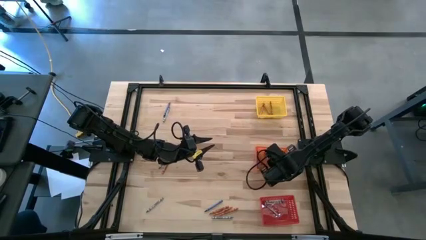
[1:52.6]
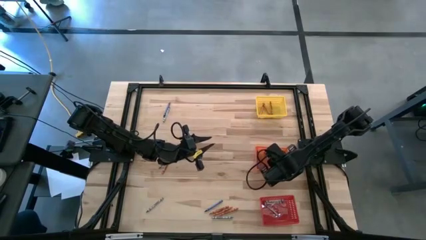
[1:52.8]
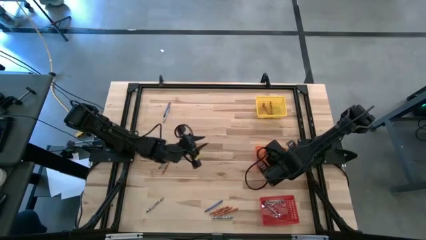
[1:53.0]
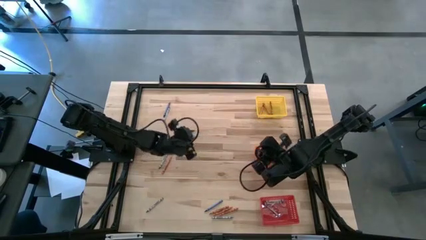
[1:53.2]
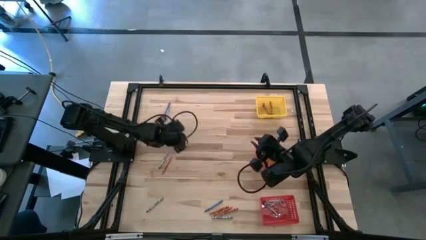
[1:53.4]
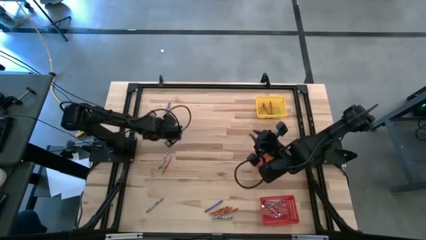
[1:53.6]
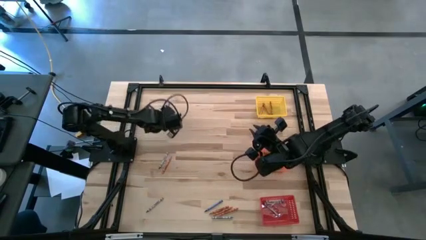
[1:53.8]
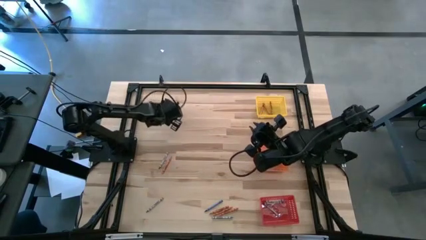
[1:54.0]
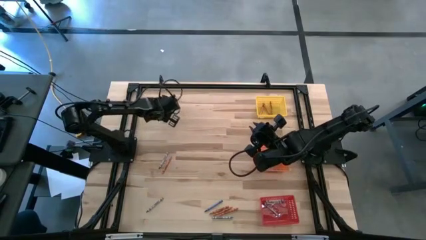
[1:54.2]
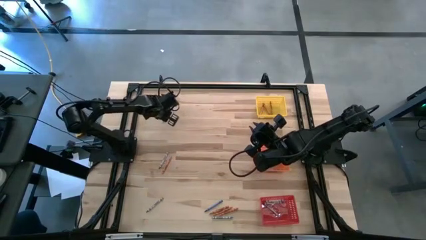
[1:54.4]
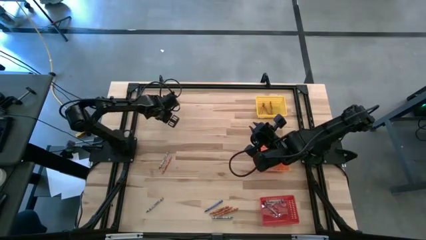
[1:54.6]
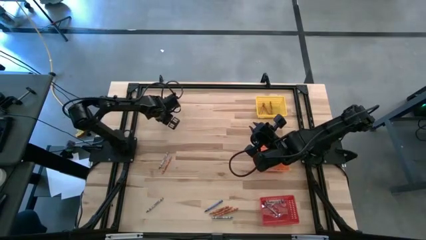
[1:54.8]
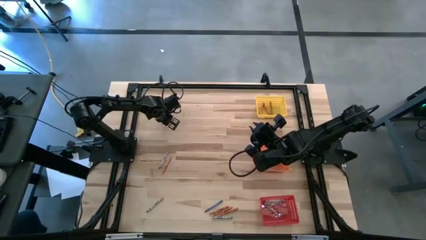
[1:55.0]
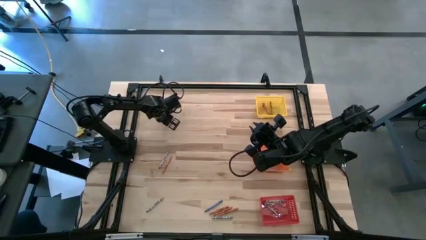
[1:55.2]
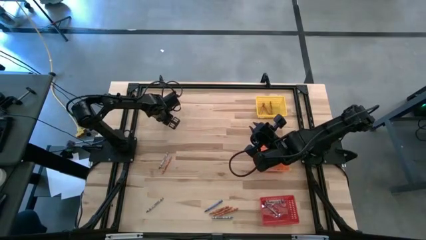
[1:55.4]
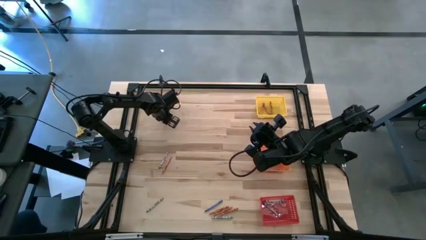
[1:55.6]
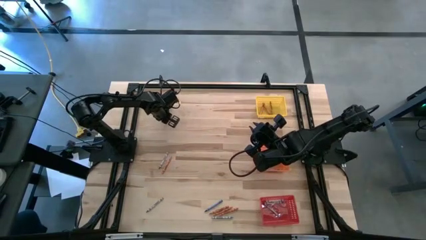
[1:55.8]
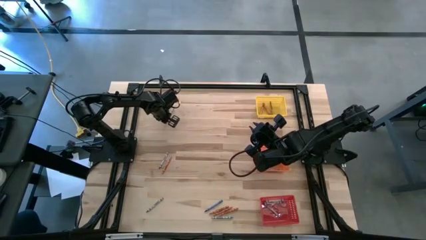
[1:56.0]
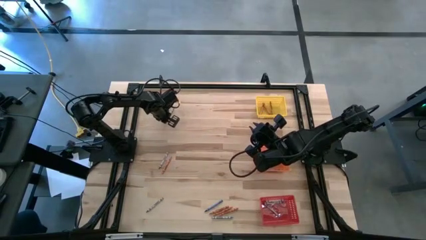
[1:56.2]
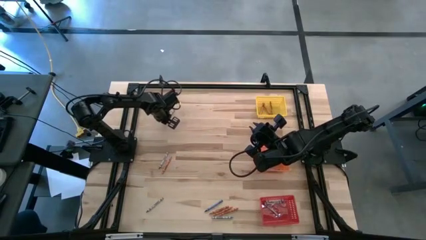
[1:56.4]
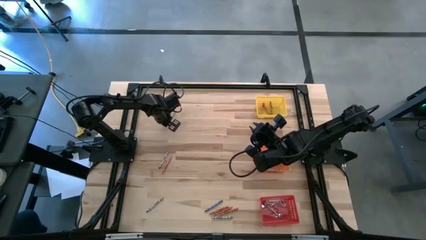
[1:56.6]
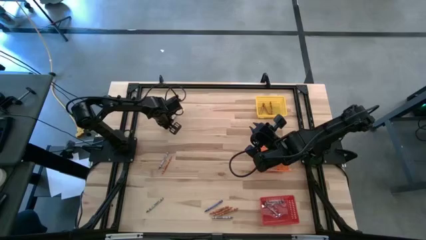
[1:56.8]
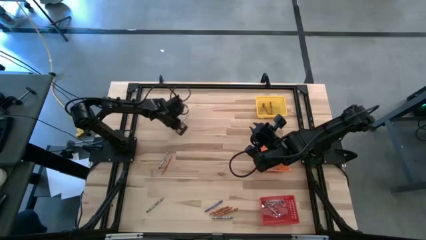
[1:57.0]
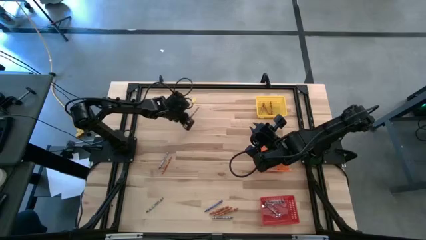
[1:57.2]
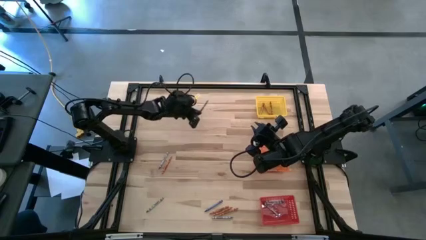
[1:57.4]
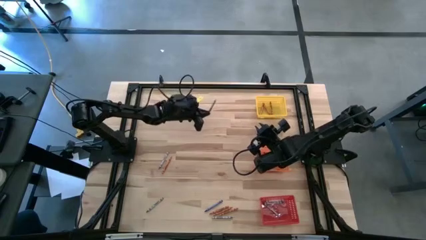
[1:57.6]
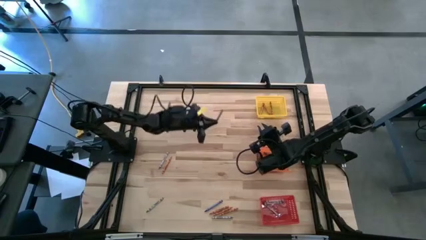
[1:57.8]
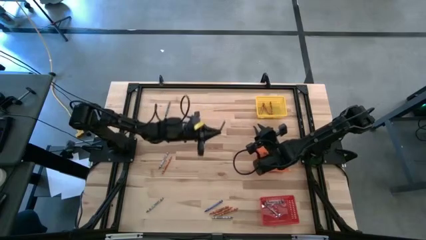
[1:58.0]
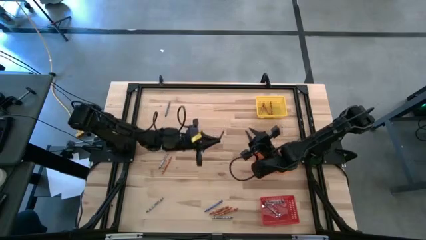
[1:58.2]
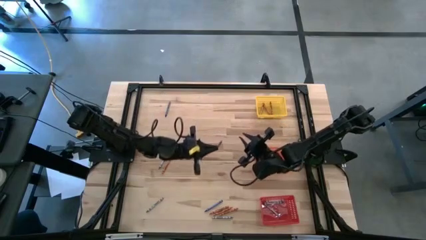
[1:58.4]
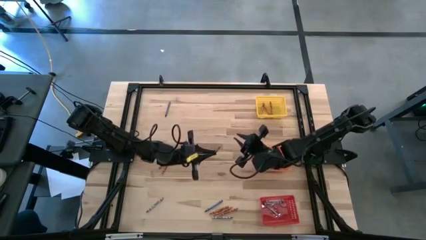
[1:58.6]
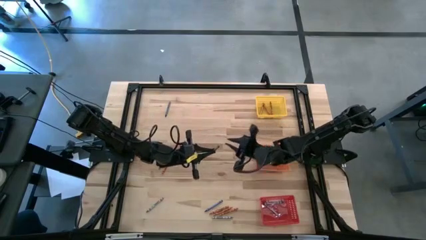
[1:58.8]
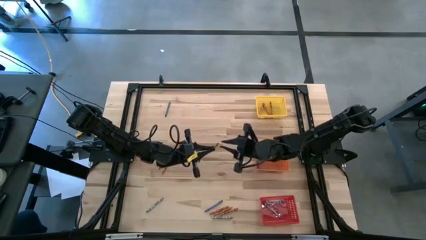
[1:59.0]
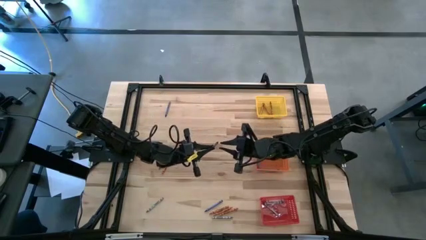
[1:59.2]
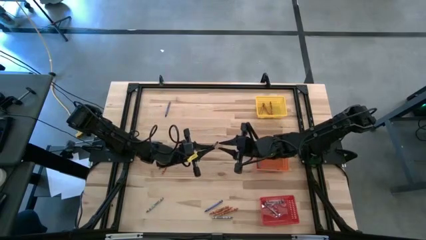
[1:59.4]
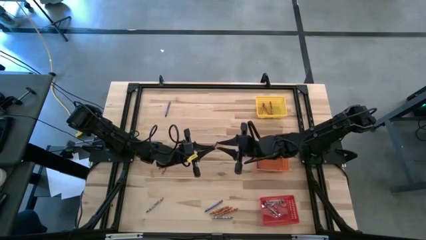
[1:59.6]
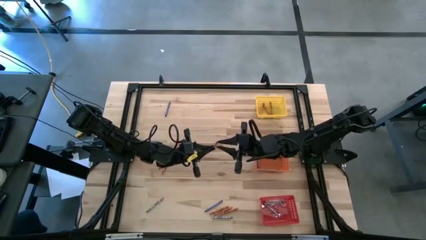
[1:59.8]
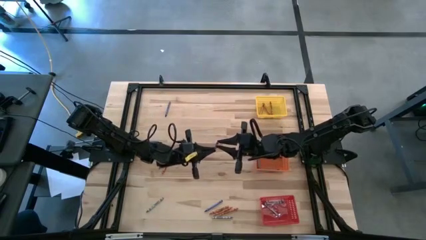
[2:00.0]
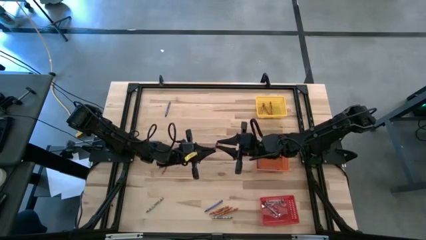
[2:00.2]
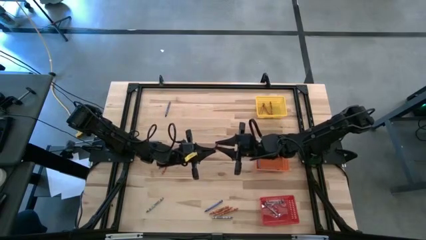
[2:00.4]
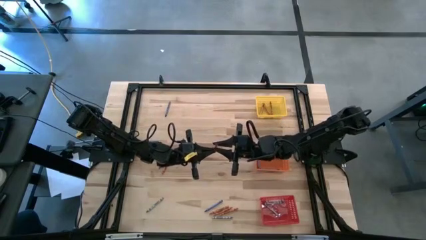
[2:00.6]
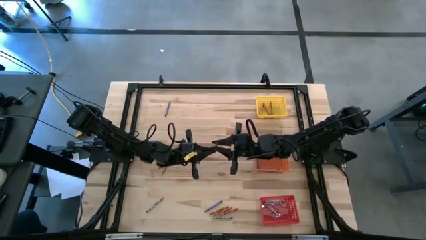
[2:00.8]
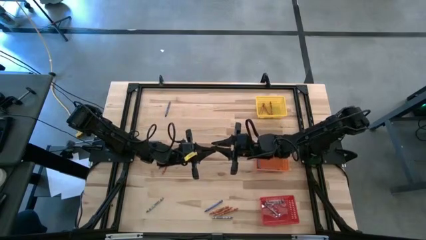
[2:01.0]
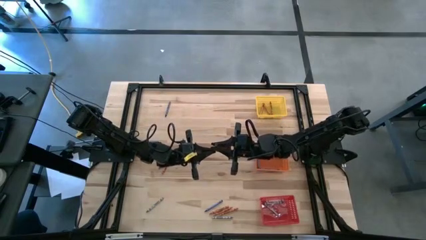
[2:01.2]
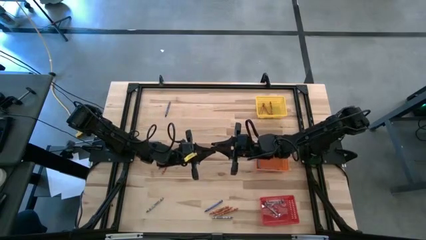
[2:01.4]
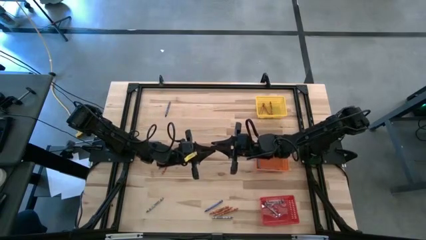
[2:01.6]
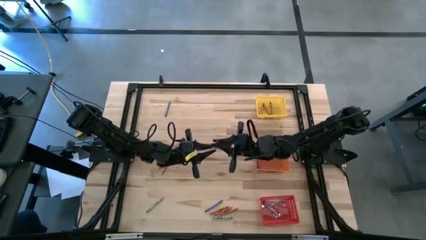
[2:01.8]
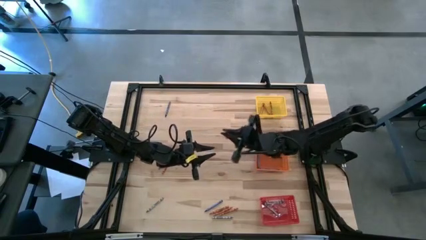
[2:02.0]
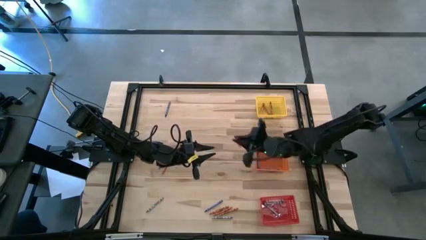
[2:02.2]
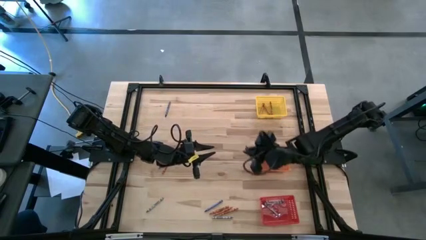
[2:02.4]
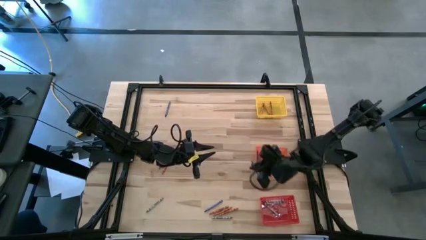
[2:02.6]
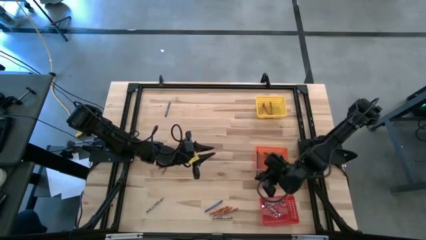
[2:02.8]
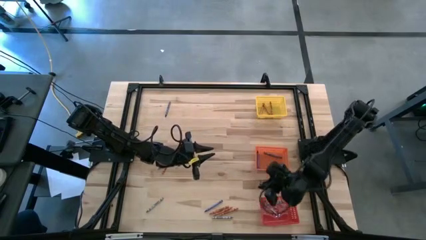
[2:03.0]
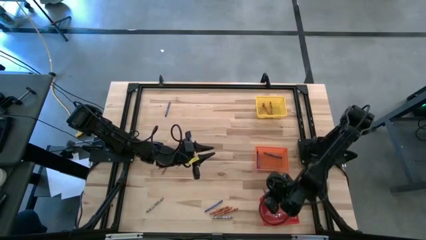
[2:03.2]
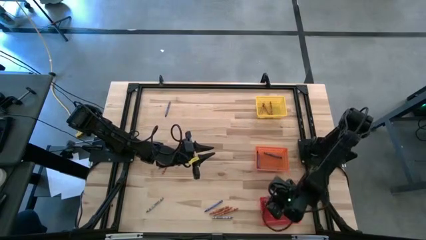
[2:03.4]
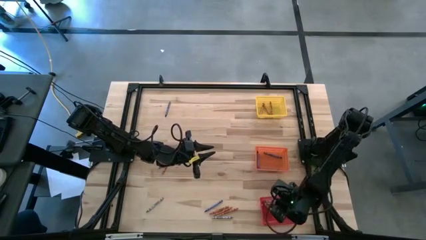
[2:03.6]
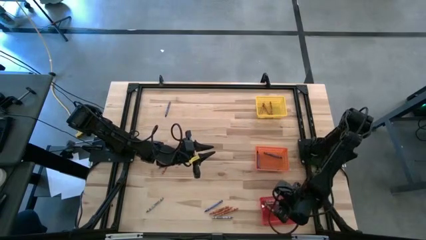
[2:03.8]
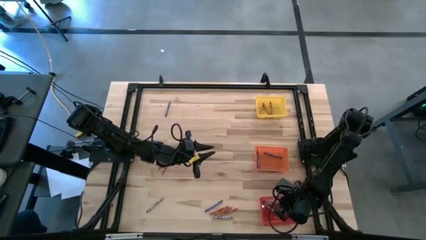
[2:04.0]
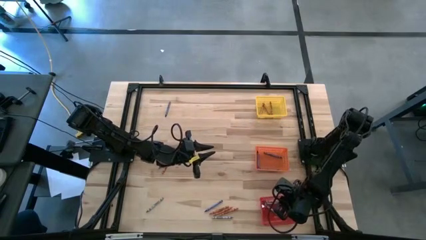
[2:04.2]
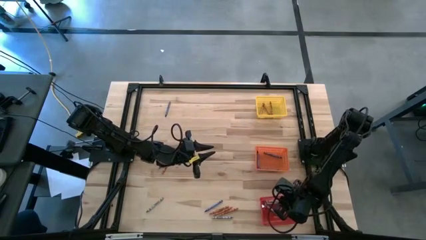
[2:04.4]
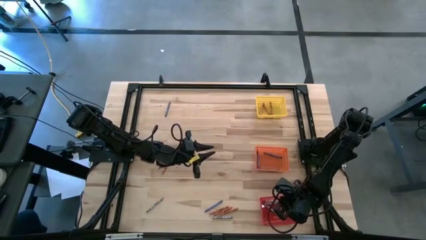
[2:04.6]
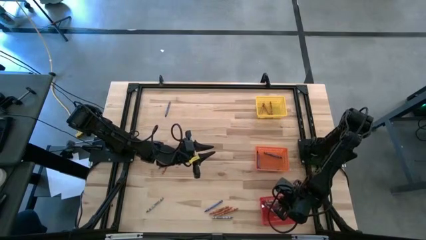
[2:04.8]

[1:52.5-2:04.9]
Task: Sort crayons
Put the gray crayon into the red bin
